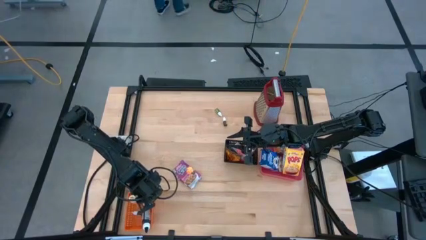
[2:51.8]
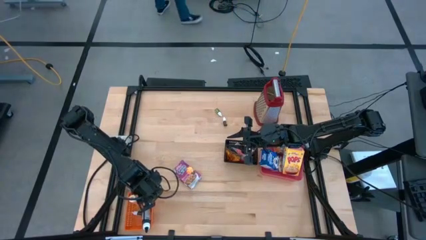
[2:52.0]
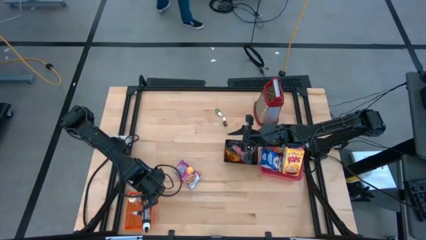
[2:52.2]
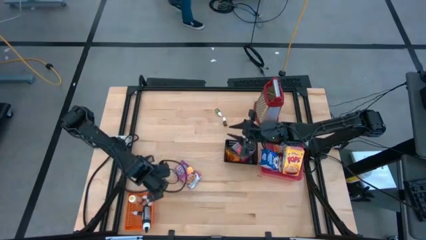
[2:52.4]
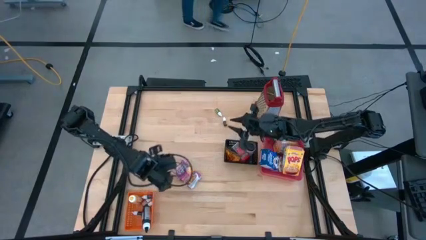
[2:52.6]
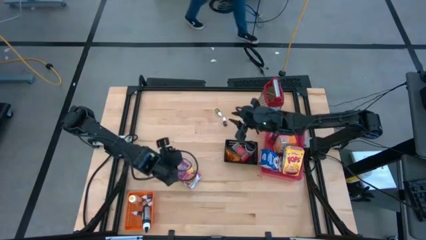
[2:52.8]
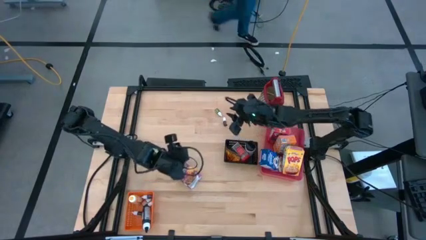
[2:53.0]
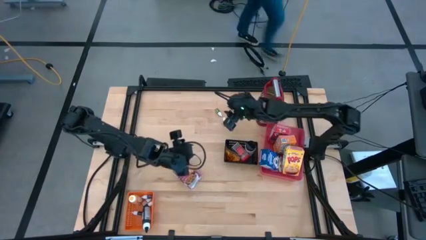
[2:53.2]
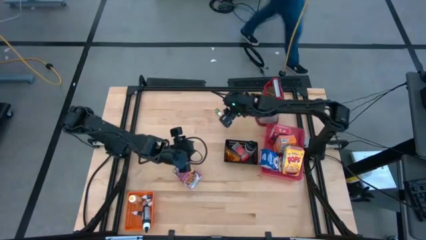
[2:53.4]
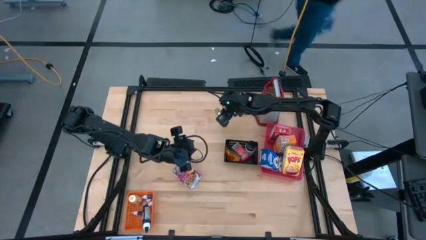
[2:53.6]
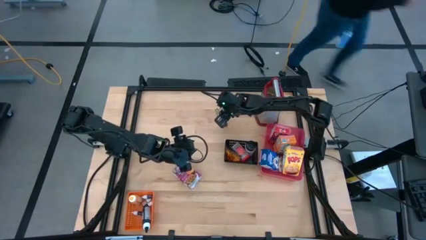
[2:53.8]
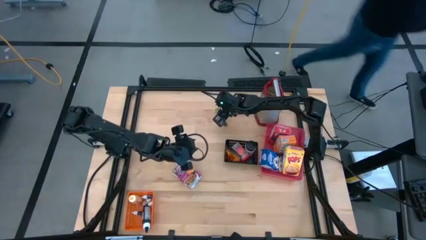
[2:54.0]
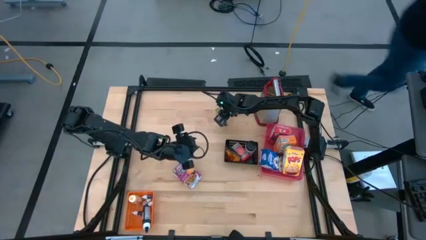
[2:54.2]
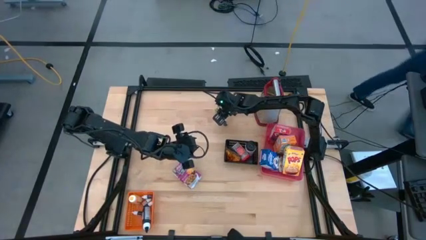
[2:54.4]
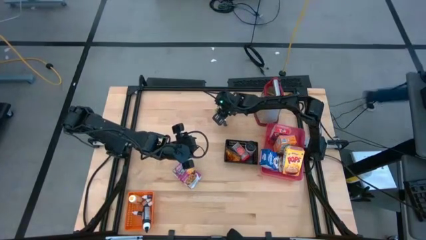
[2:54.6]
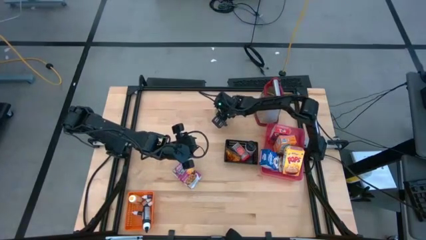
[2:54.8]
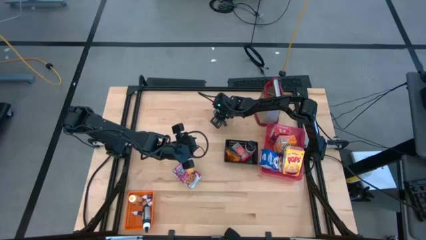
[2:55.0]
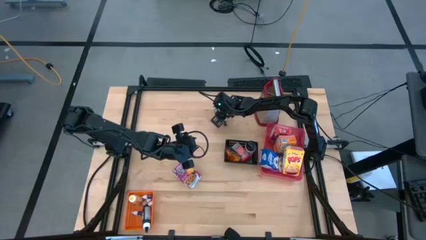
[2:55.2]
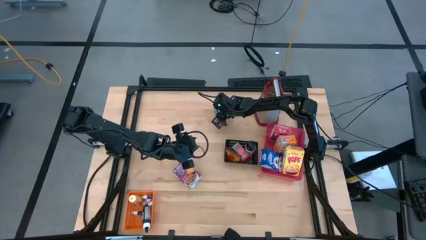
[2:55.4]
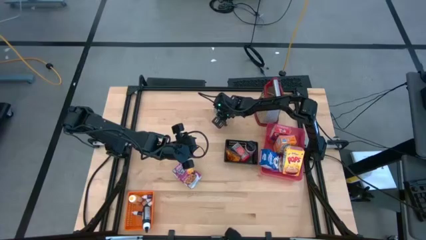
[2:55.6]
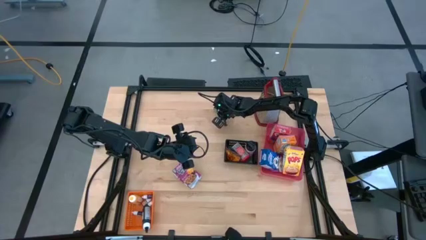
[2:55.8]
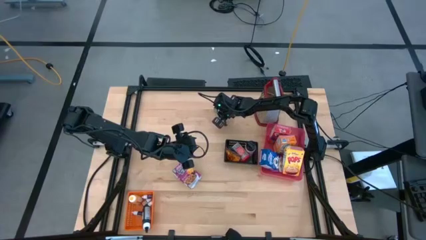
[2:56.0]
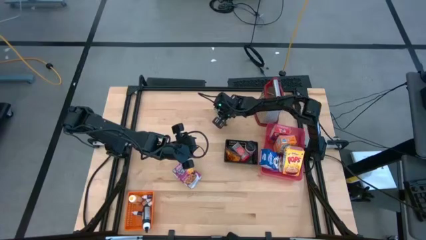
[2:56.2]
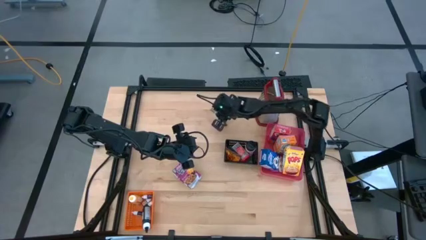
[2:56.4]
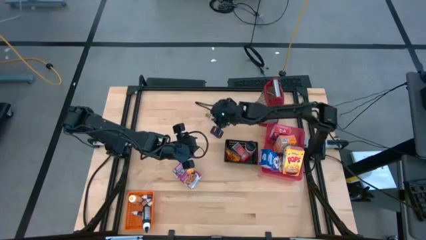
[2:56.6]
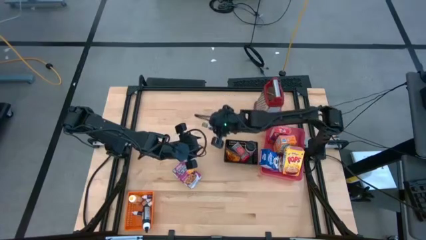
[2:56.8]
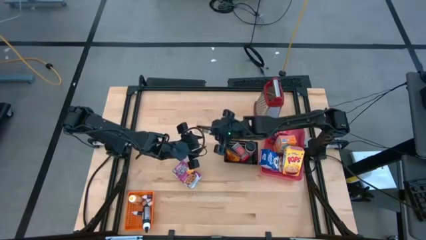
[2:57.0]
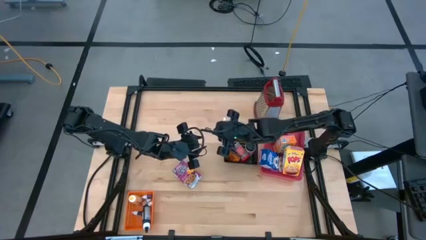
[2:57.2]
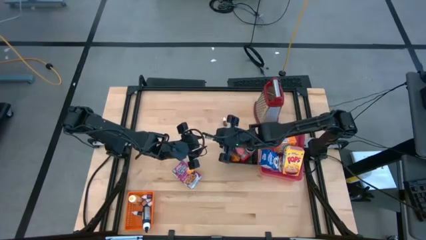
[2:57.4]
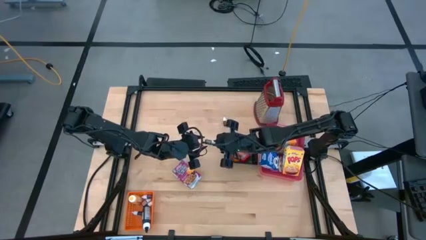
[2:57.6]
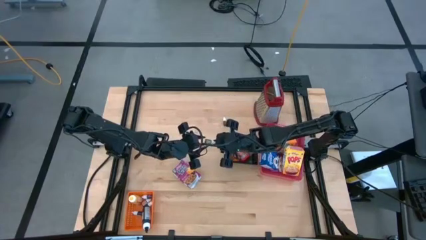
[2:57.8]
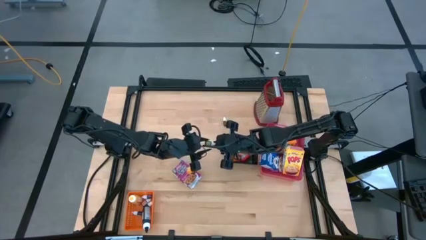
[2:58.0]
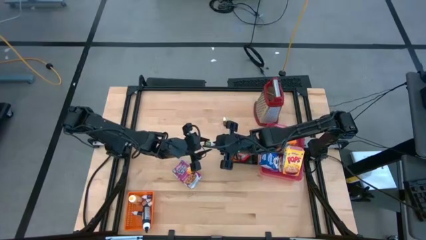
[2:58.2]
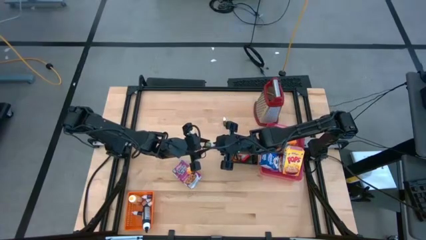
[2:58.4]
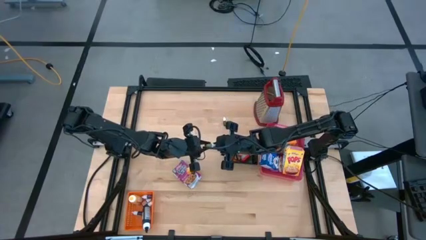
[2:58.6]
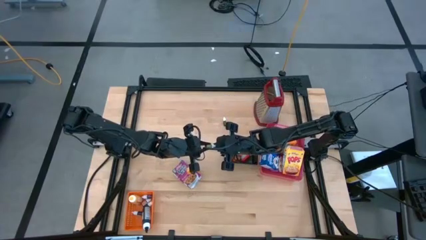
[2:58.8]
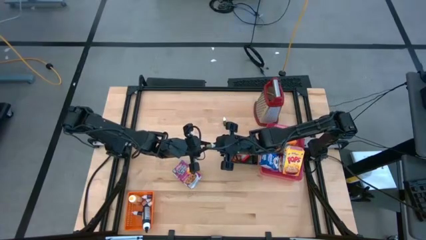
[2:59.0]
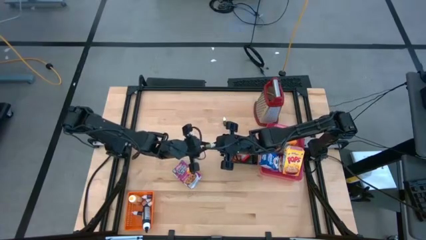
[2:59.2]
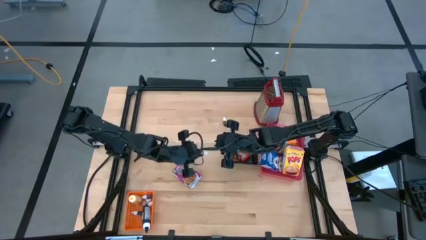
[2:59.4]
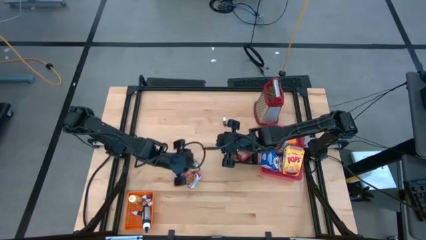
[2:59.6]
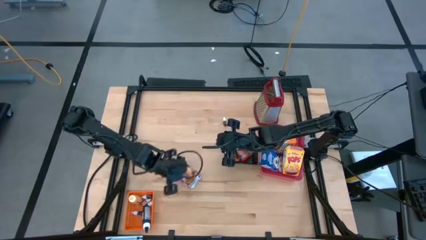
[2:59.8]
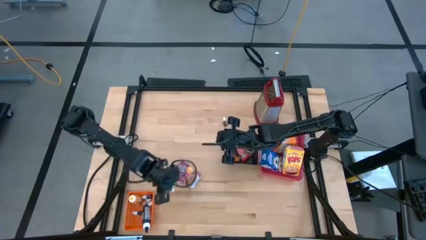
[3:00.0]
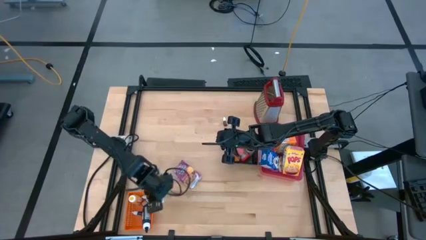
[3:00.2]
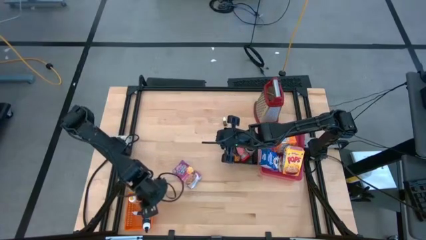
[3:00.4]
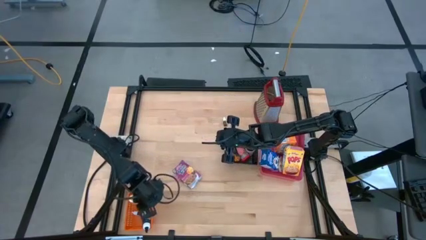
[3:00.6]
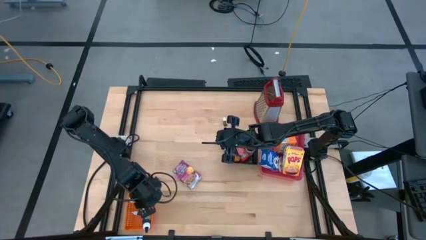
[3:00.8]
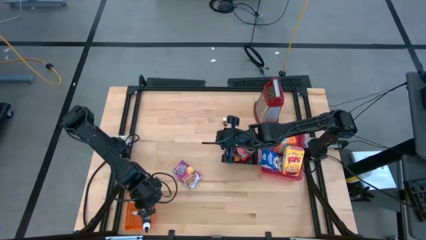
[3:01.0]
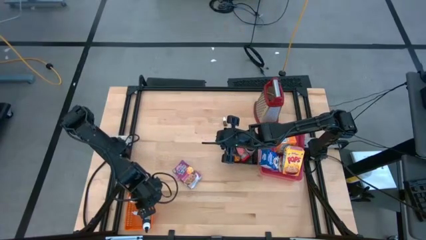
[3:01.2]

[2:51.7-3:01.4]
Task: Pick & Place Kitchen Items
Put the small green food coloring bottle into the orange bin

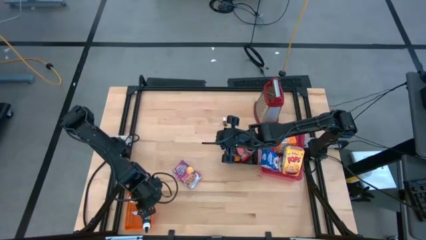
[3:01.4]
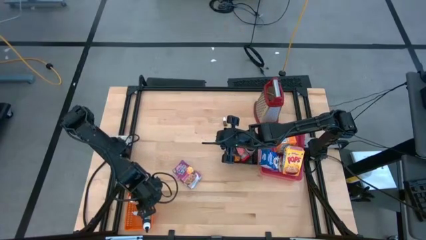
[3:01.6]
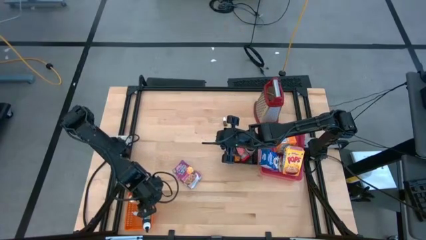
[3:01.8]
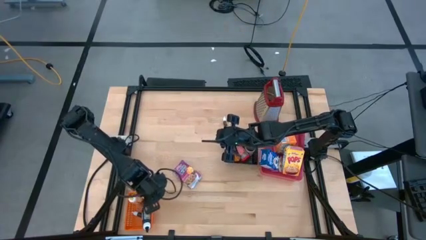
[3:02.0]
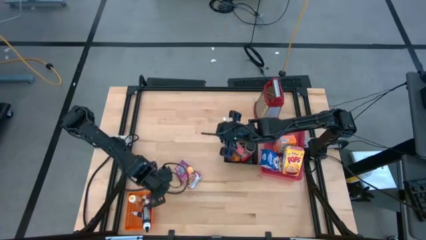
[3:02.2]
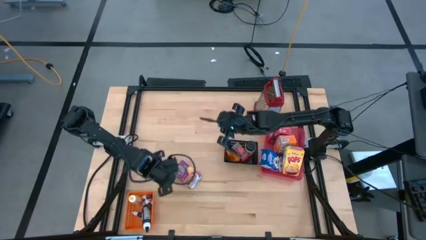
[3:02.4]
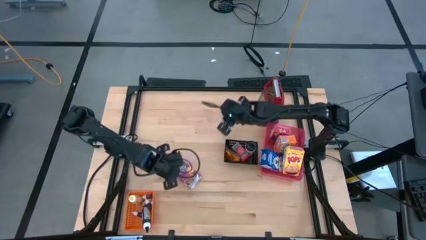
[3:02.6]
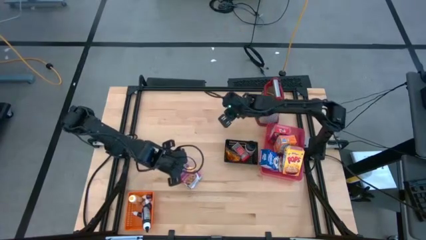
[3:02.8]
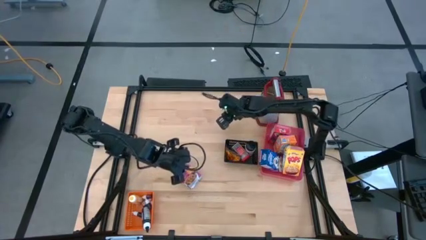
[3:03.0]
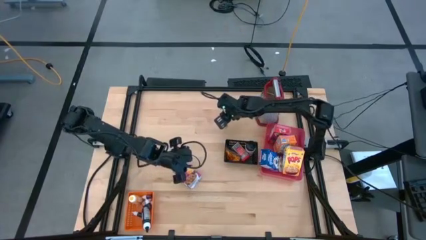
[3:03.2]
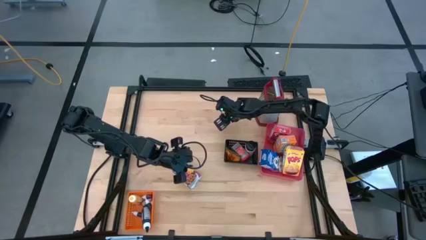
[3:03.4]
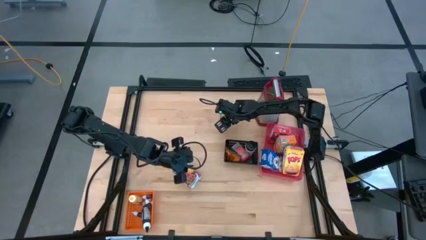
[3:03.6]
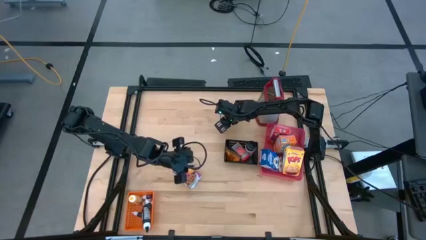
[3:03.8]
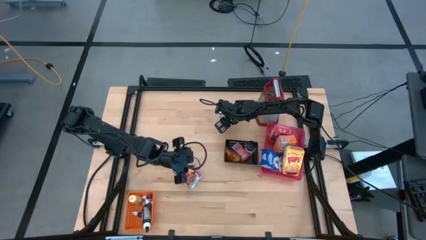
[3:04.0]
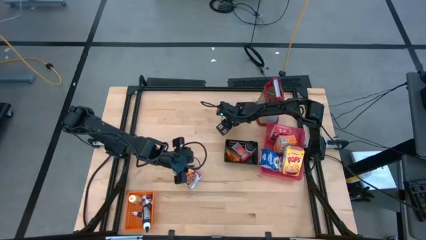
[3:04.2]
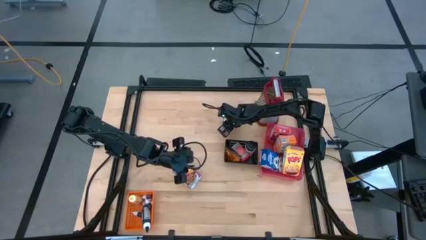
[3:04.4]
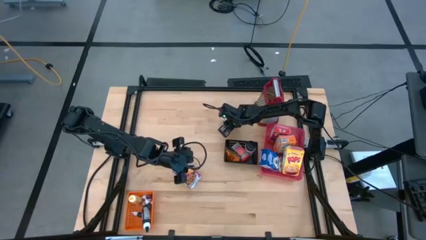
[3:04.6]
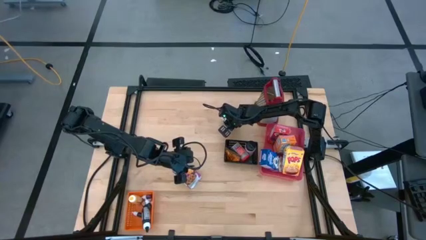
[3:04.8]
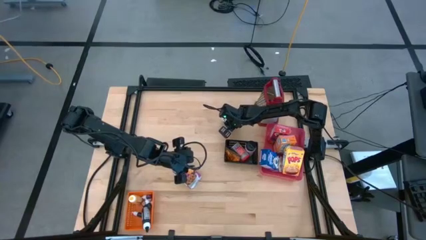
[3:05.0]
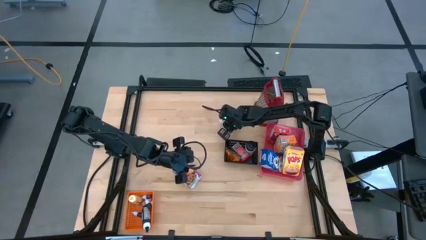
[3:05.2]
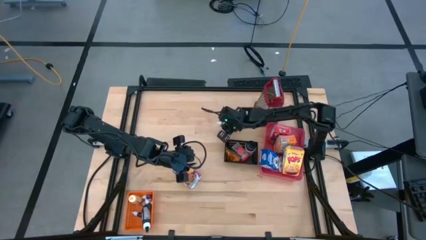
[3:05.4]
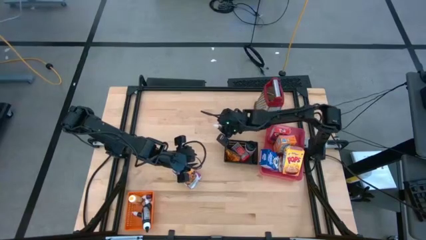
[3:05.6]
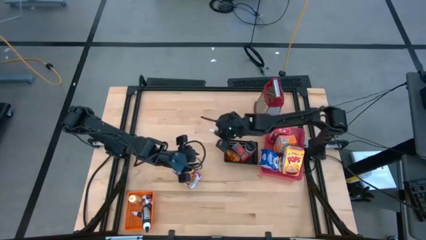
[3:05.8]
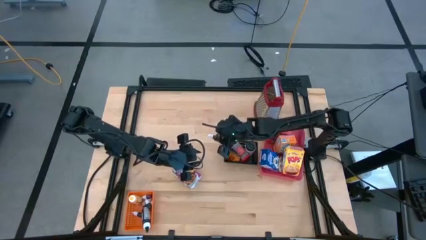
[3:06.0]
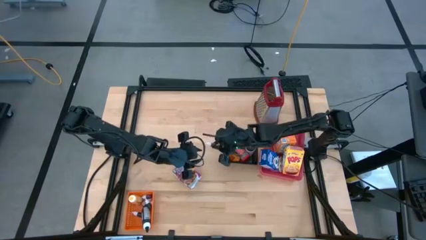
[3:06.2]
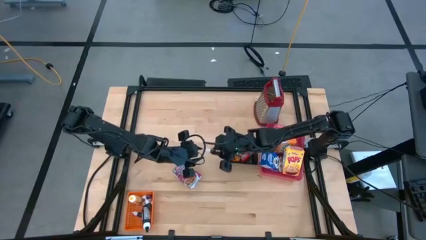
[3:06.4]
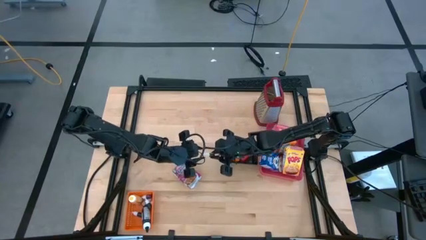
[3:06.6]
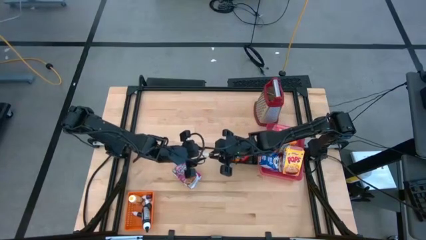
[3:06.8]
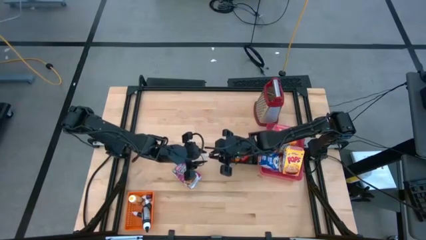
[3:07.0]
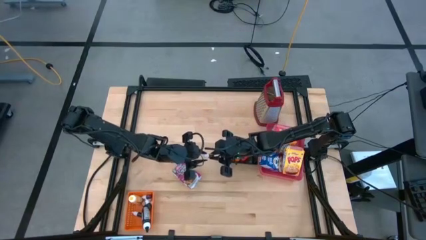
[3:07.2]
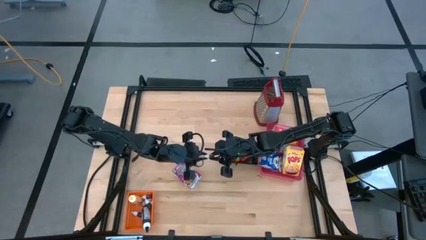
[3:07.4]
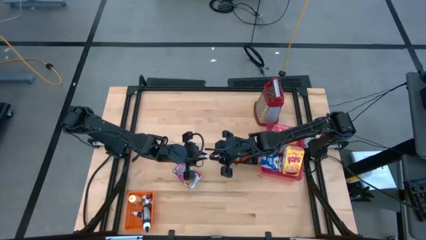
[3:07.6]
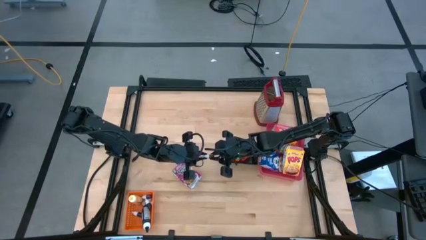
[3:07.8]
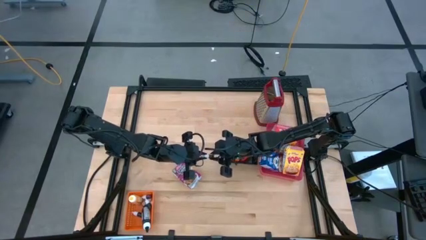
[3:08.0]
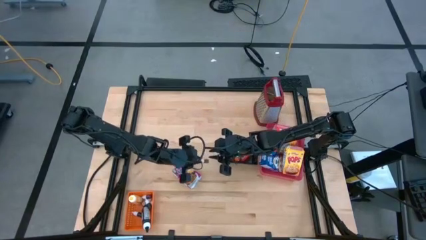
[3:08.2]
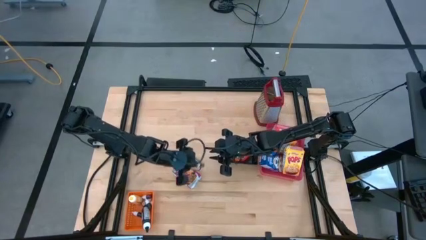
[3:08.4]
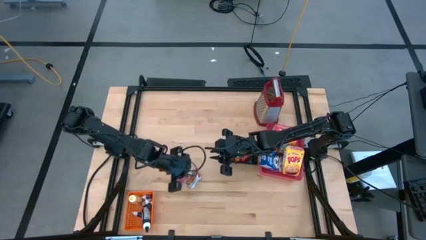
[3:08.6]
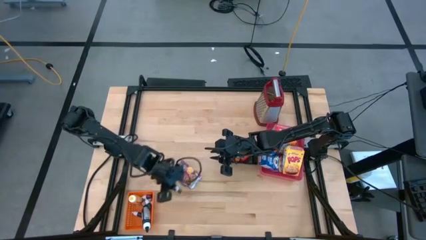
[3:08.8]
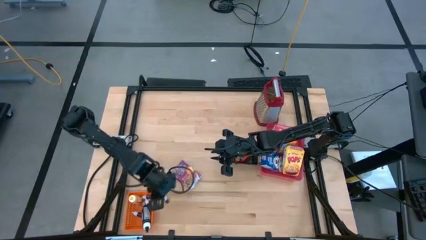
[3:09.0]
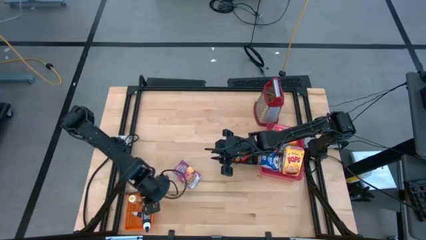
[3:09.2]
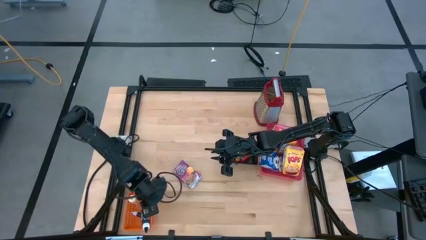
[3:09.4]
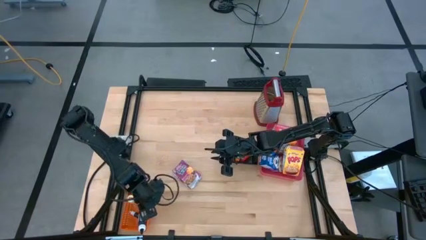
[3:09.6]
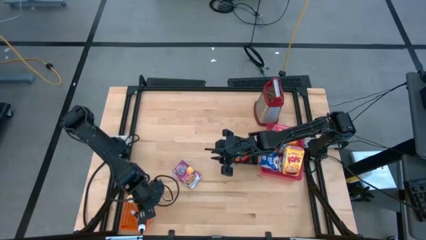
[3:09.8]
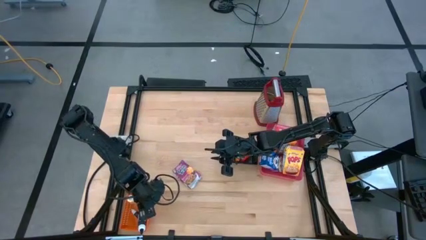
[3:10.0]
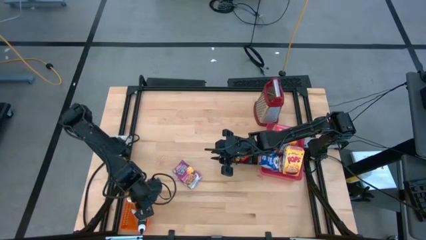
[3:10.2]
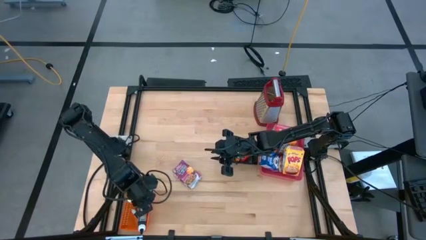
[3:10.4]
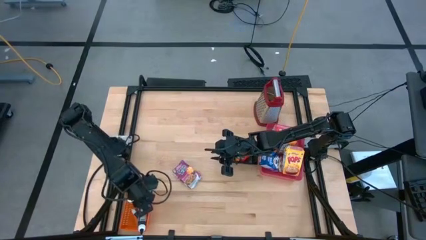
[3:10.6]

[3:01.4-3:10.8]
Put the small brown food coloring bottle into the orange bin
